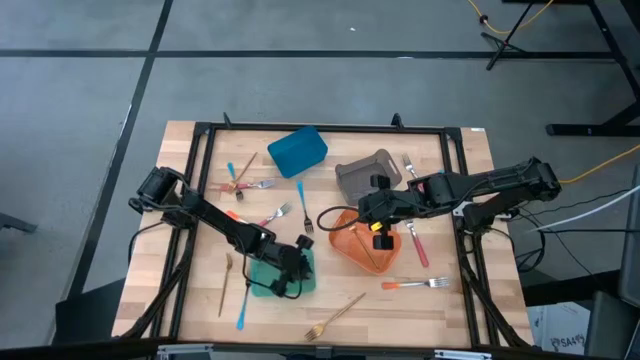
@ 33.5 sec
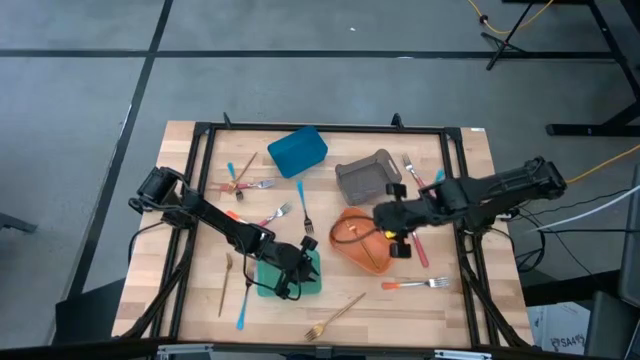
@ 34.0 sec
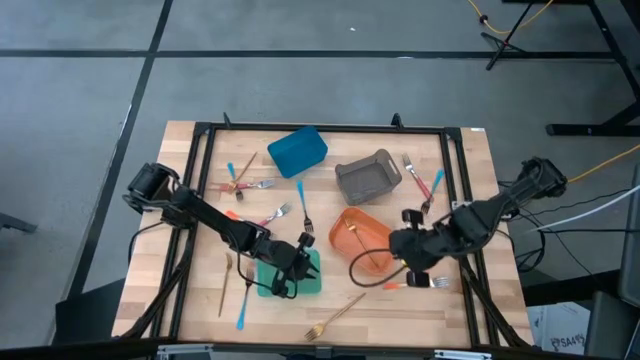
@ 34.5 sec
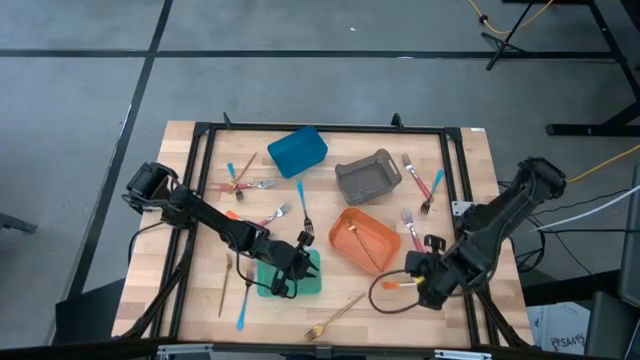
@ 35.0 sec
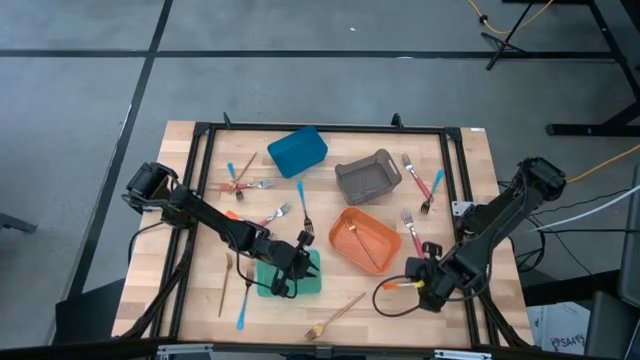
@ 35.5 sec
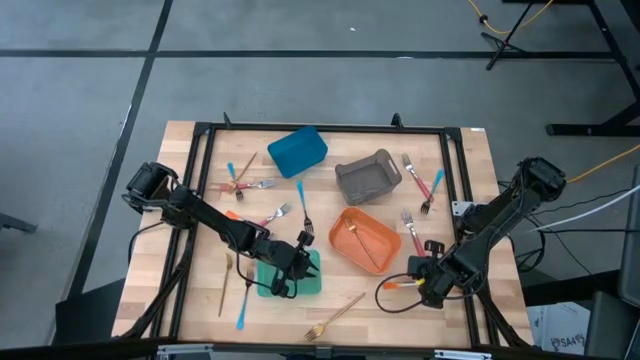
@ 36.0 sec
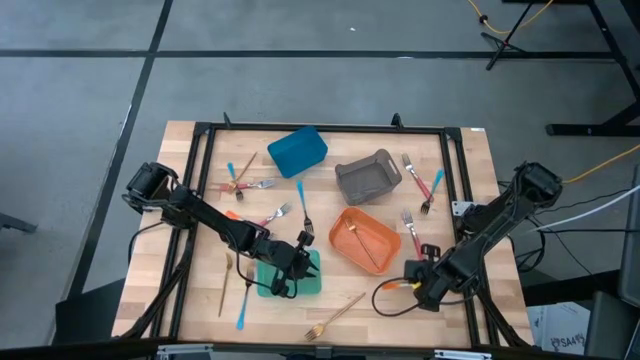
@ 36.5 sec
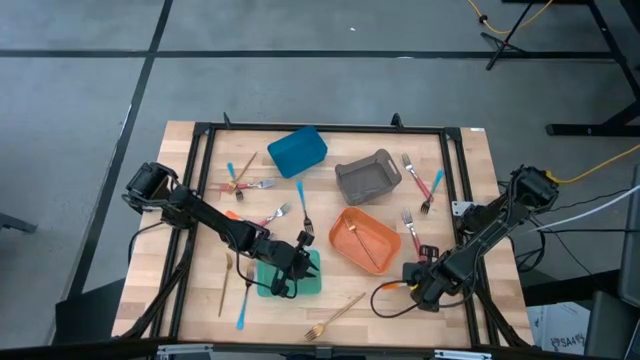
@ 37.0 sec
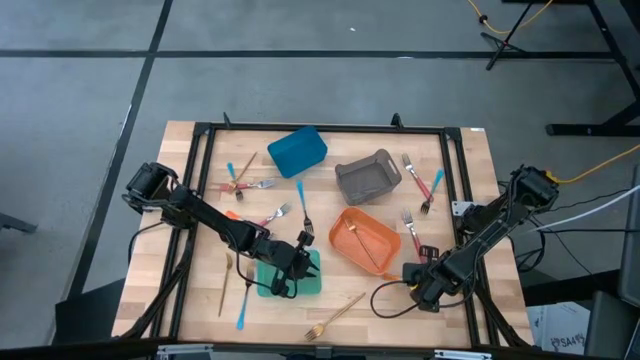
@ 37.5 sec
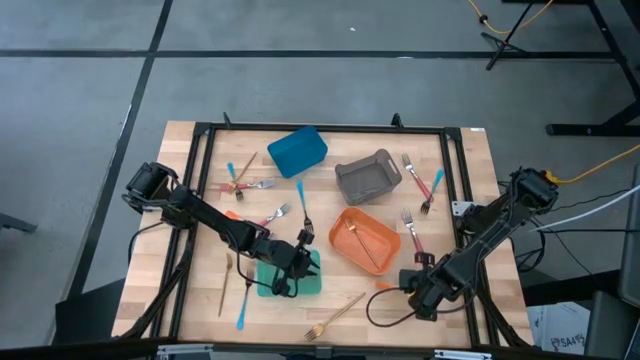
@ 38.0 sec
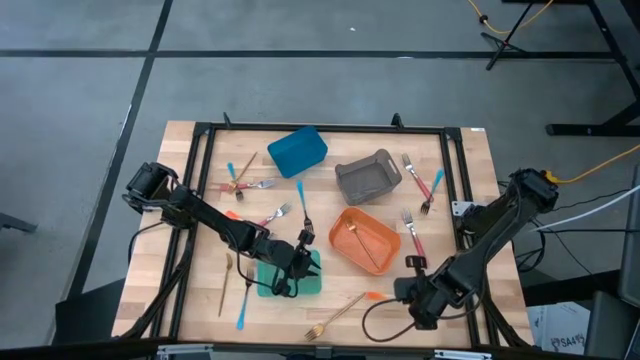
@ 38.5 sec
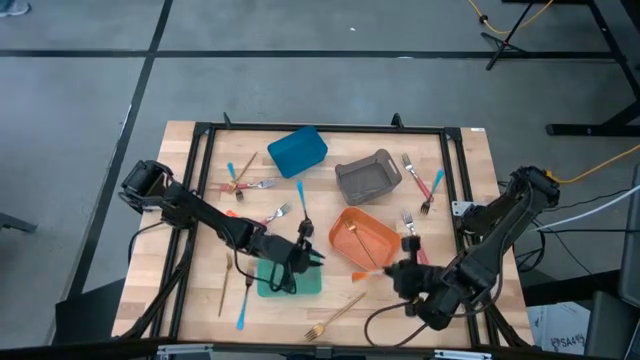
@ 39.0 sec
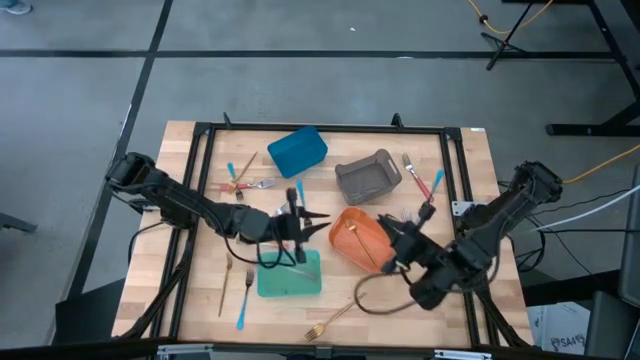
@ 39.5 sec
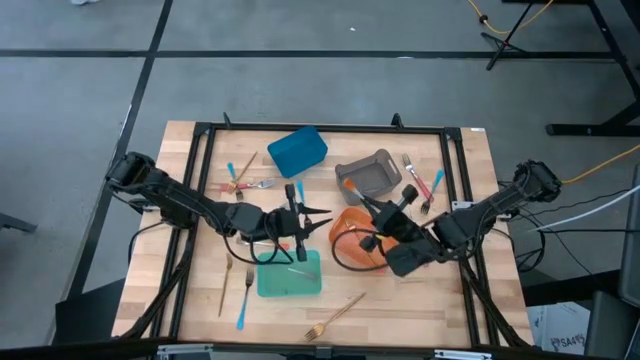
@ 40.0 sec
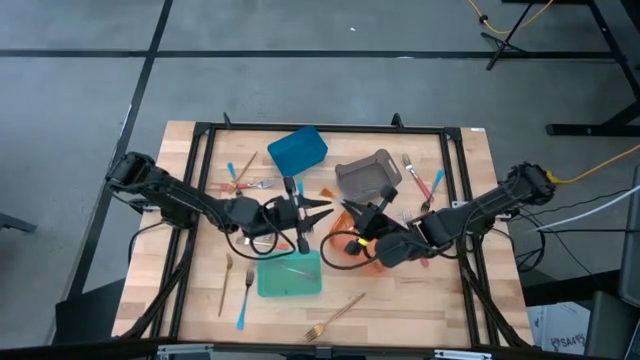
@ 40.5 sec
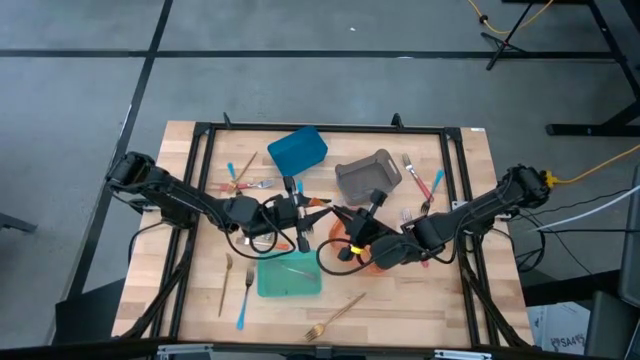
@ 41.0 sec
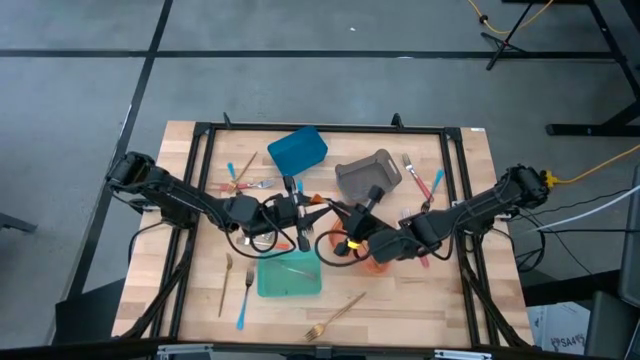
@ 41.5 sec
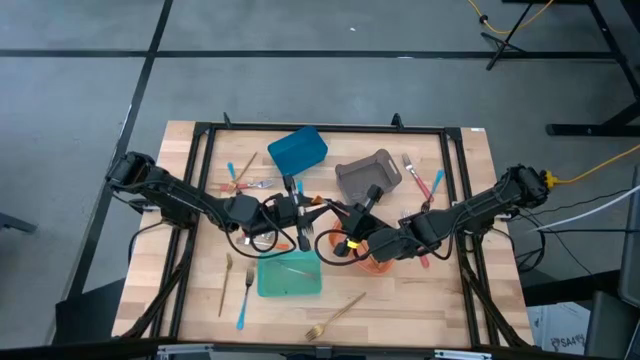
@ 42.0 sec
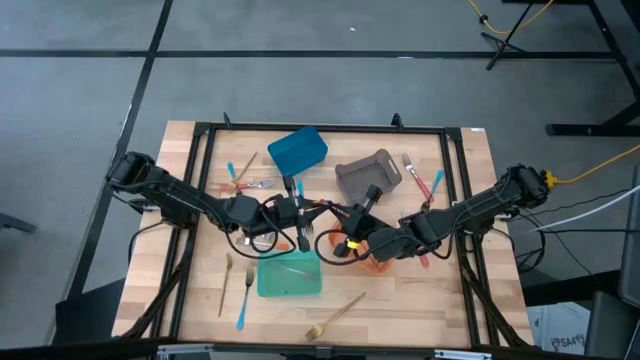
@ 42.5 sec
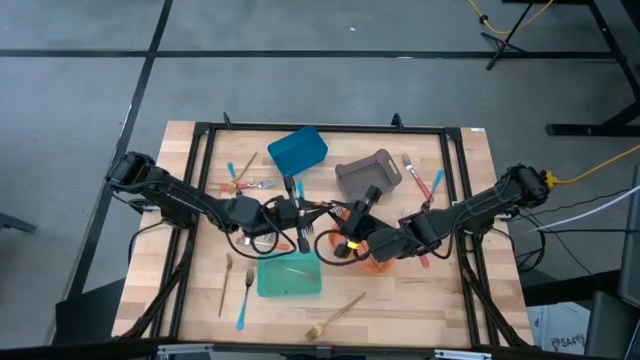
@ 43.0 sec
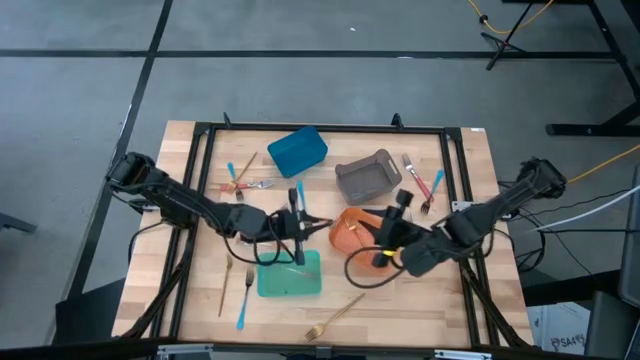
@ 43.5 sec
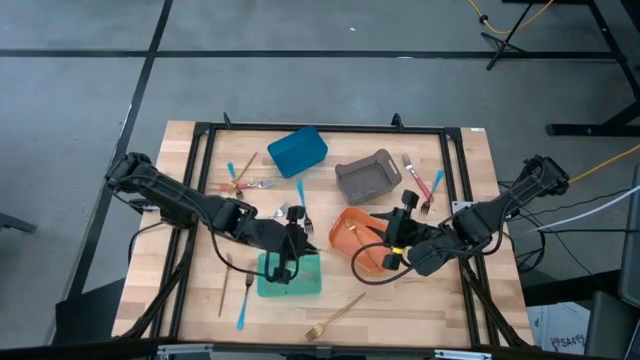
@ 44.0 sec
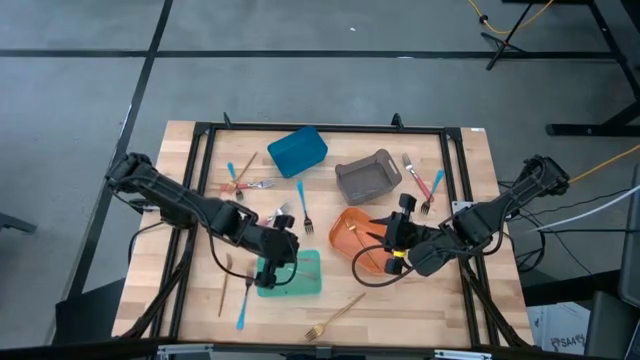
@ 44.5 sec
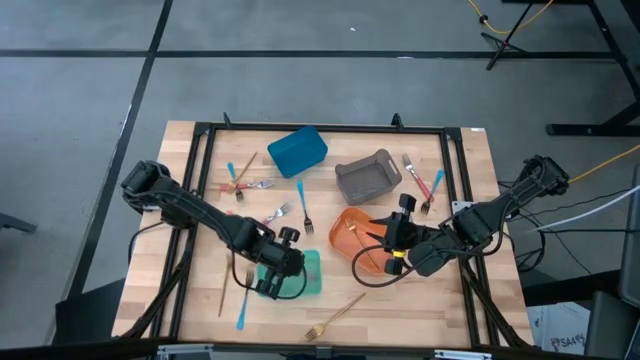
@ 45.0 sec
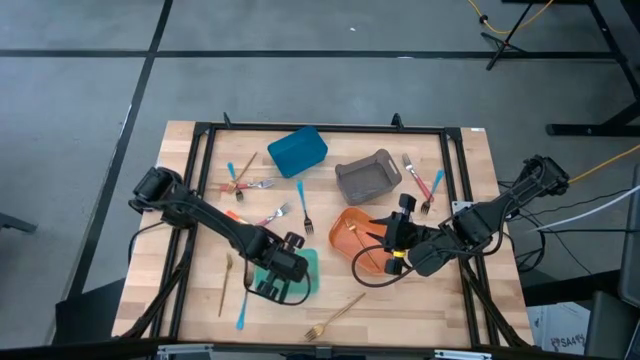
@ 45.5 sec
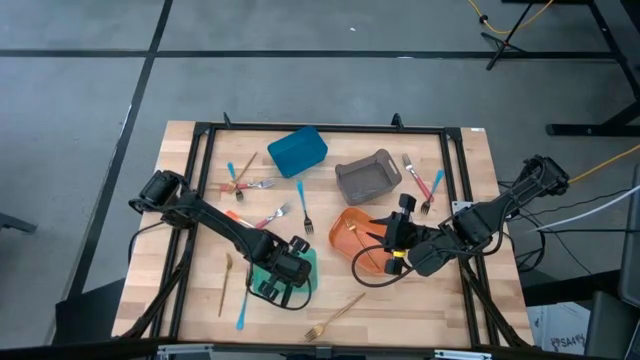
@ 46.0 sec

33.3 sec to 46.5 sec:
Task: Sort silverware by color (type)
Put the orange fork into the green bin

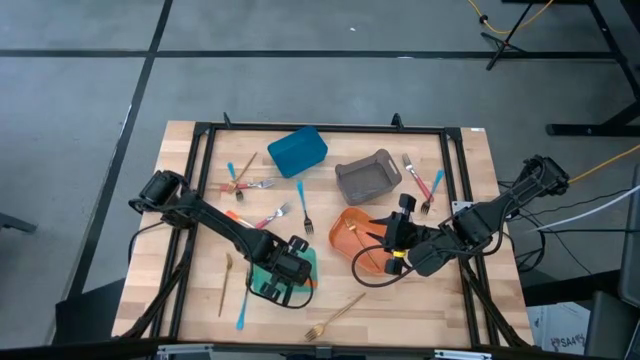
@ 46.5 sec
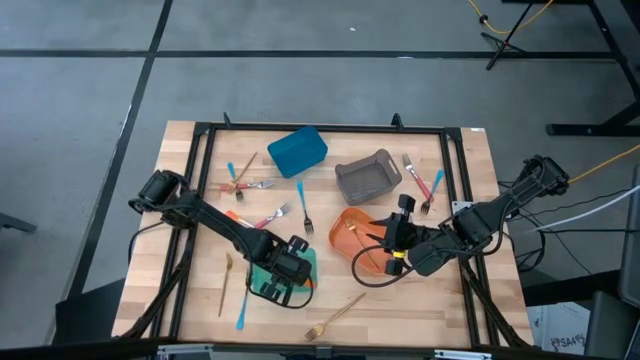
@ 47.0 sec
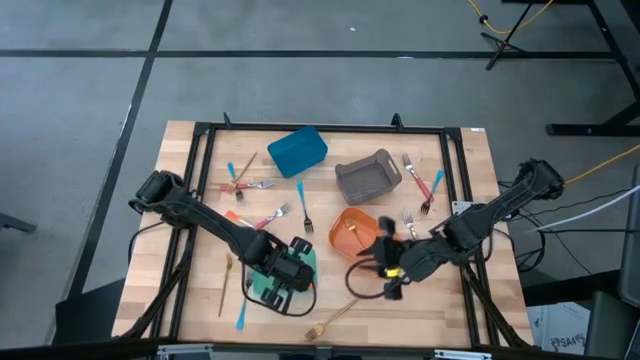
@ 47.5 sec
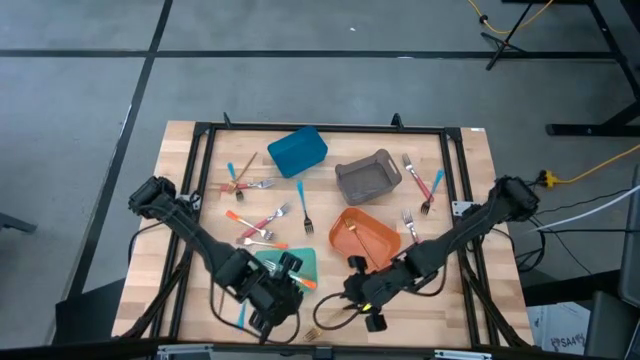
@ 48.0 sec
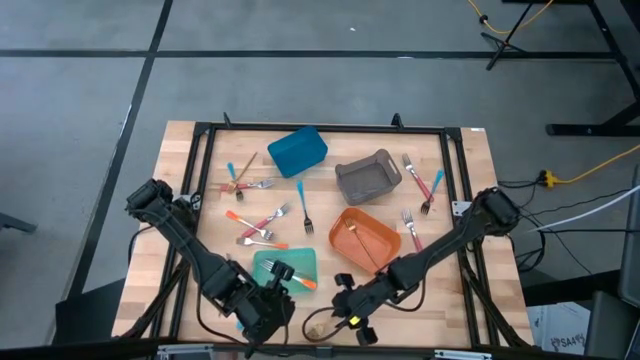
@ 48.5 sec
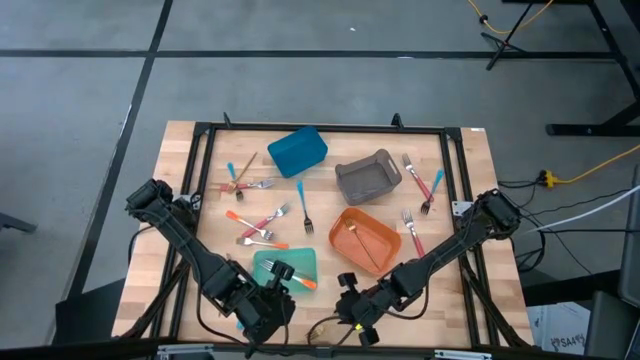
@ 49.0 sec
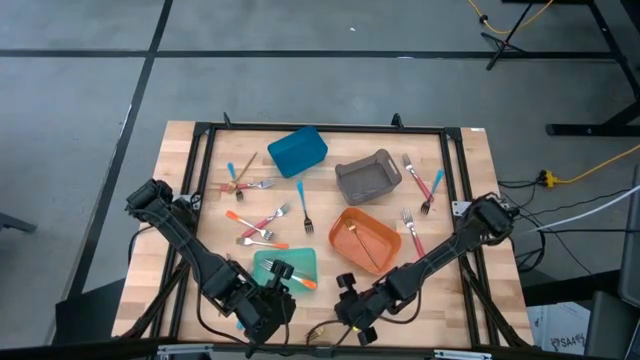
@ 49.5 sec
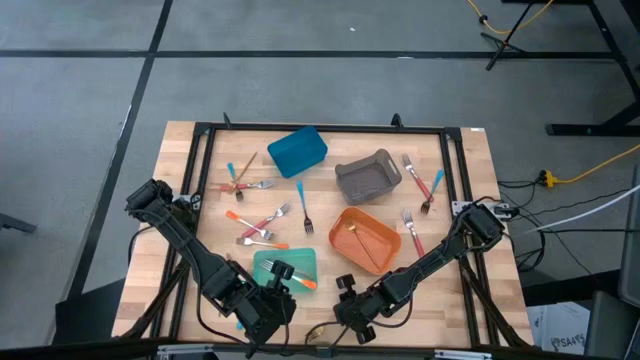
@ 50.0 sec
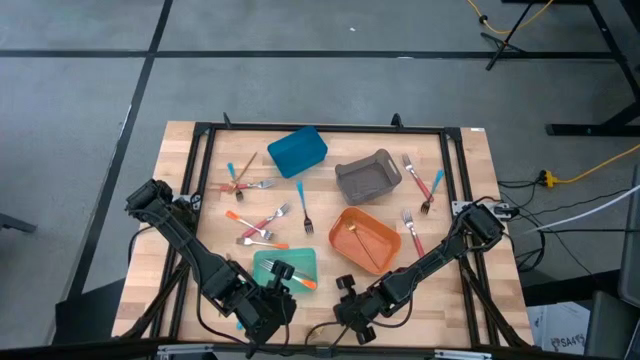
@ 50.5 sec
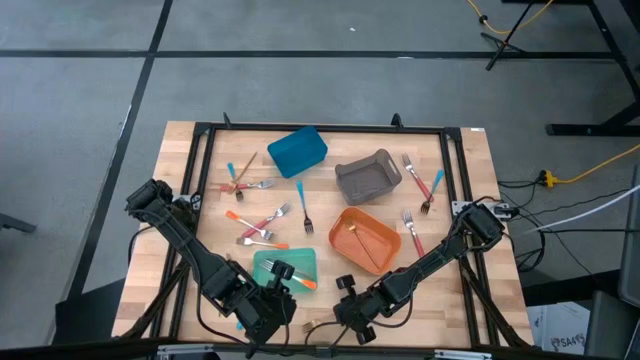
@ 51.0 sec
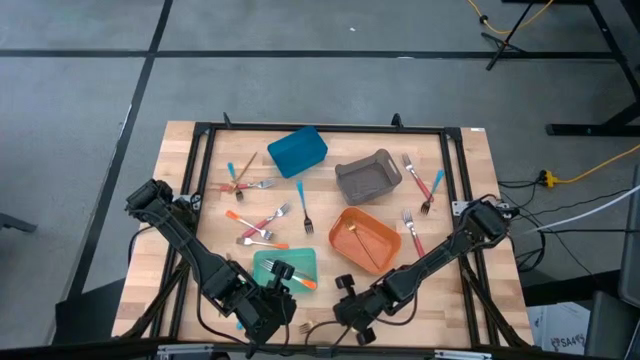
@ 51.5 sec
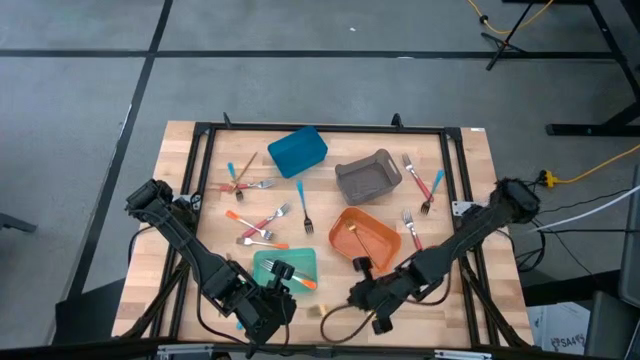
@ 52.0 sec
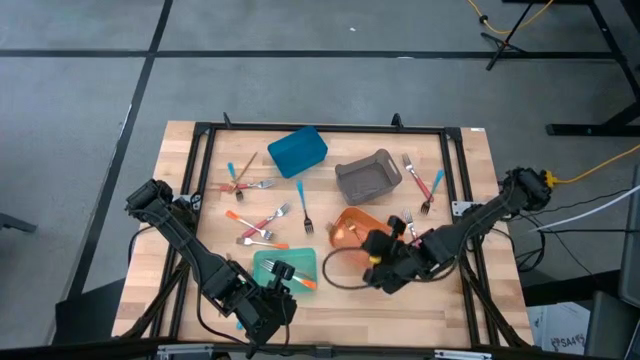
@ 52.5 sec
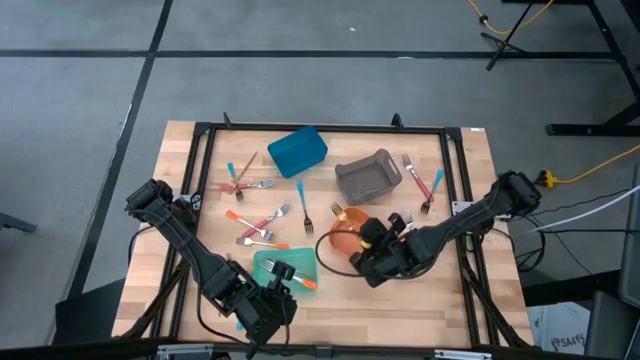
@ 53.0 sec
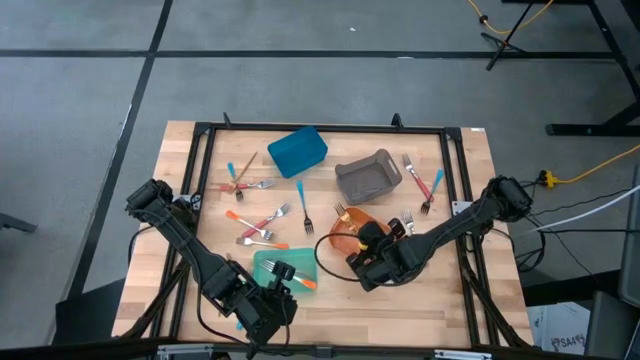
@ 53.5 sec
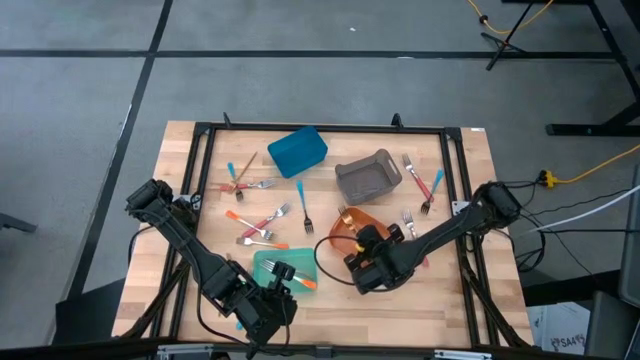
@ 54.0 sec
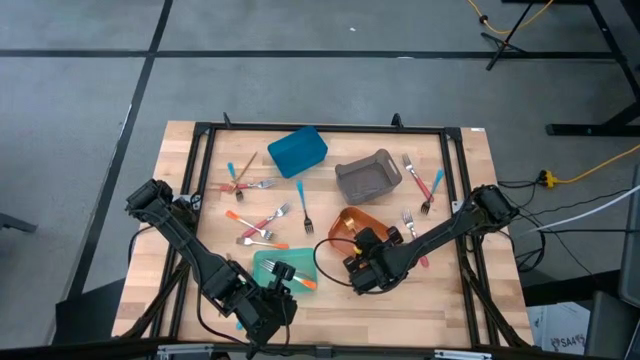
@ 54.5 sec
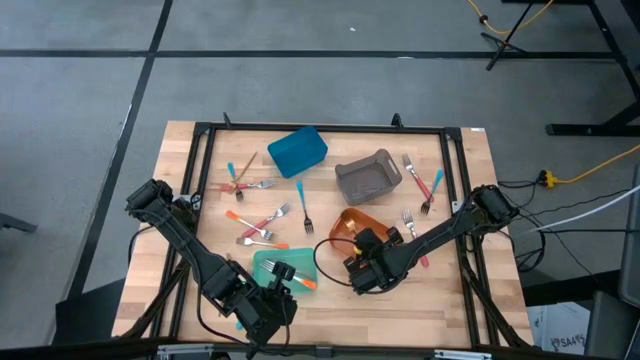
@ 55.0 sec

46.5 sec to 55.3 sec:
Put the gold fork into the orange bin
